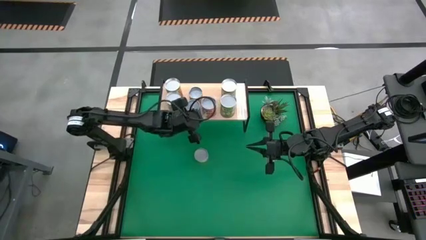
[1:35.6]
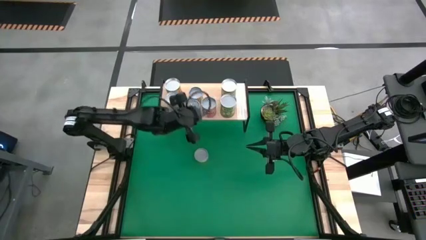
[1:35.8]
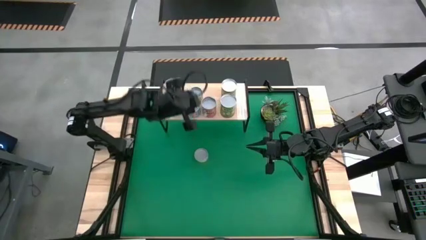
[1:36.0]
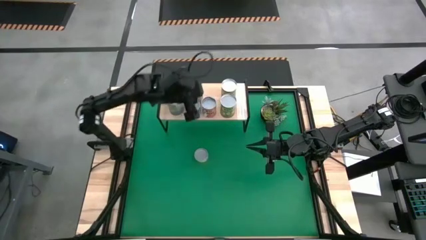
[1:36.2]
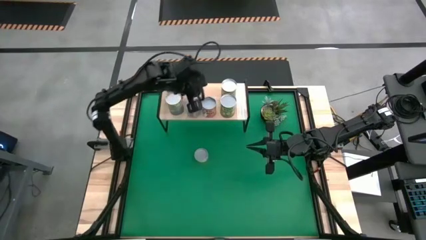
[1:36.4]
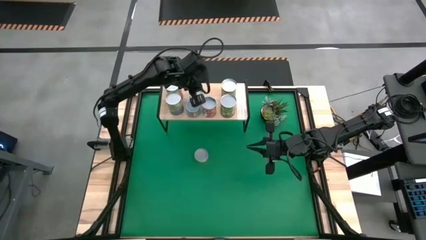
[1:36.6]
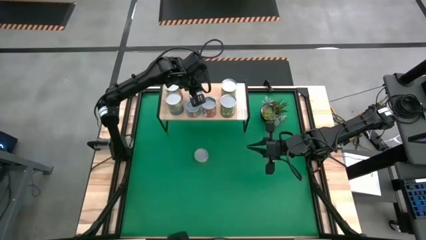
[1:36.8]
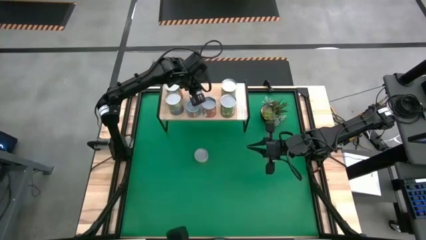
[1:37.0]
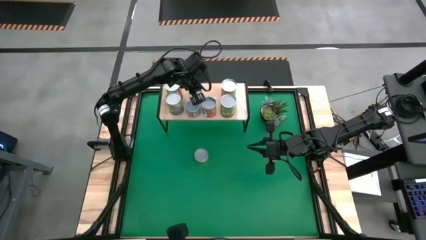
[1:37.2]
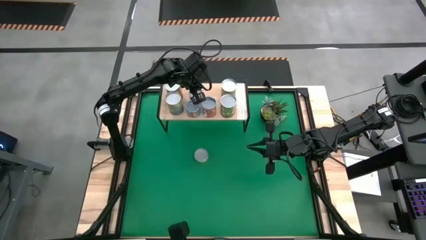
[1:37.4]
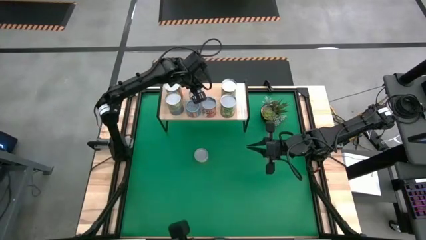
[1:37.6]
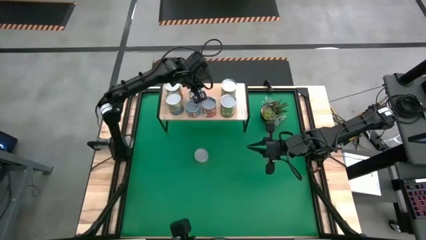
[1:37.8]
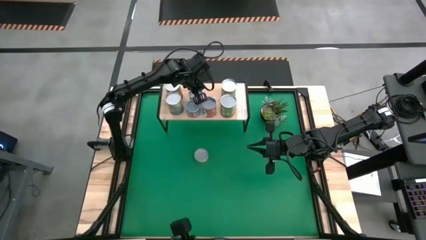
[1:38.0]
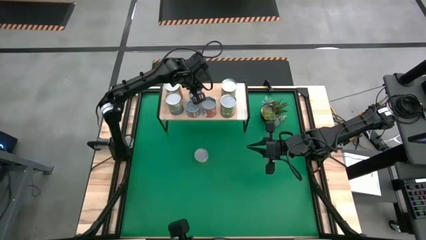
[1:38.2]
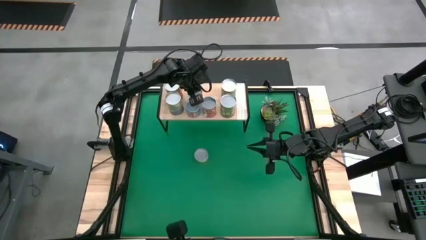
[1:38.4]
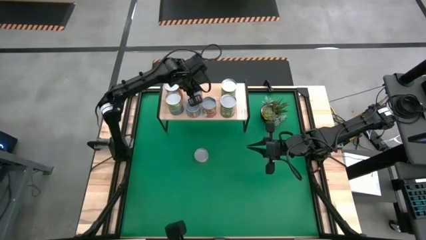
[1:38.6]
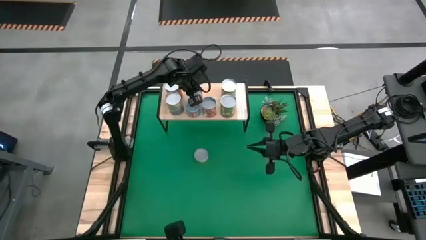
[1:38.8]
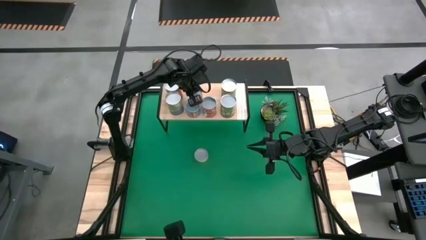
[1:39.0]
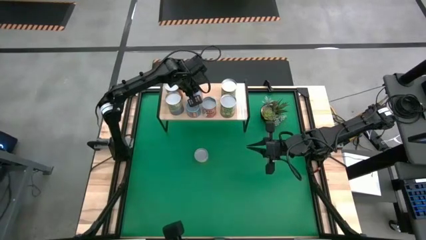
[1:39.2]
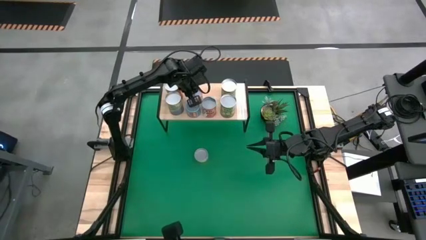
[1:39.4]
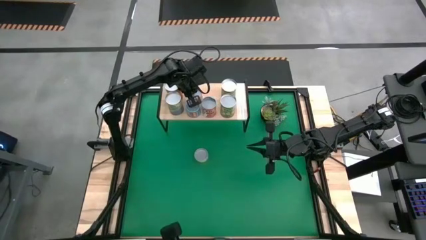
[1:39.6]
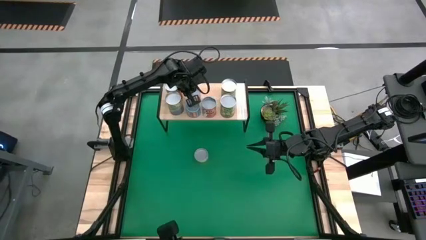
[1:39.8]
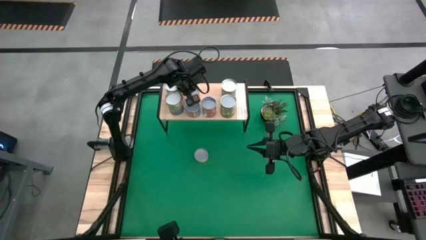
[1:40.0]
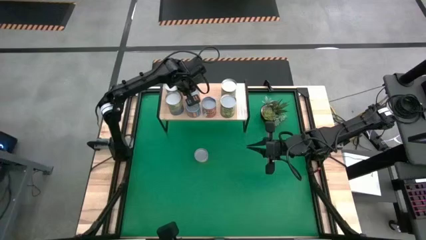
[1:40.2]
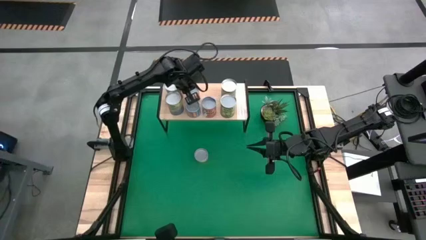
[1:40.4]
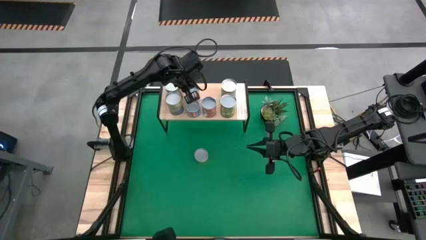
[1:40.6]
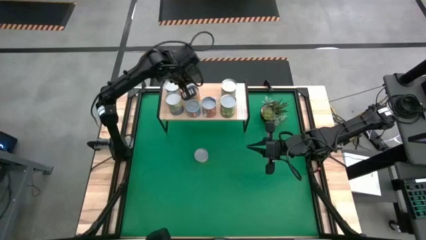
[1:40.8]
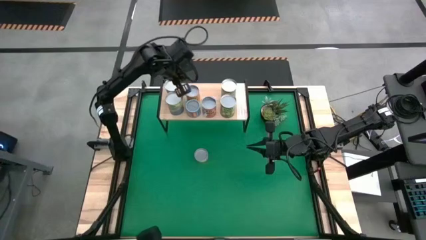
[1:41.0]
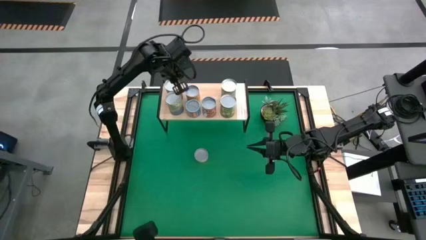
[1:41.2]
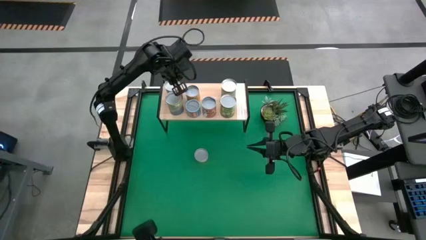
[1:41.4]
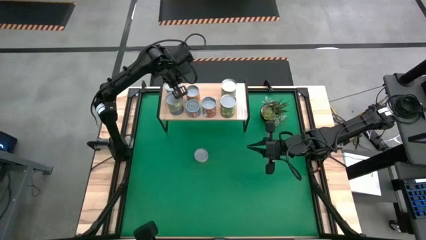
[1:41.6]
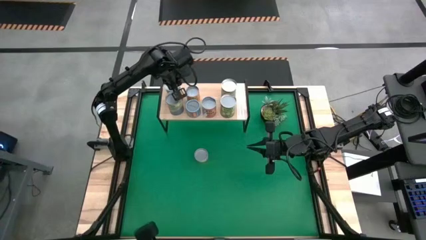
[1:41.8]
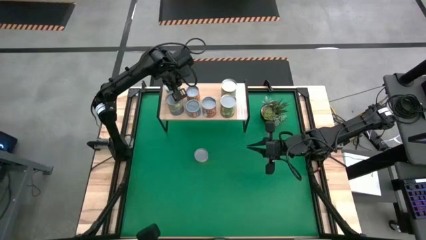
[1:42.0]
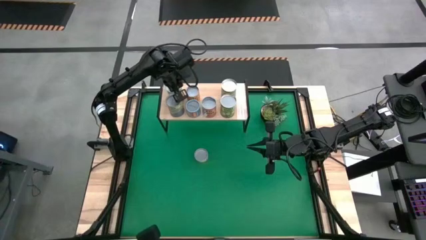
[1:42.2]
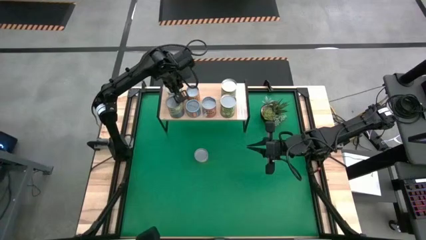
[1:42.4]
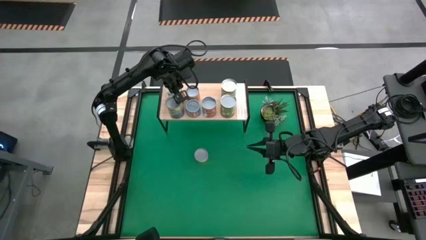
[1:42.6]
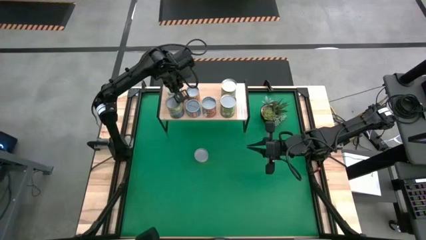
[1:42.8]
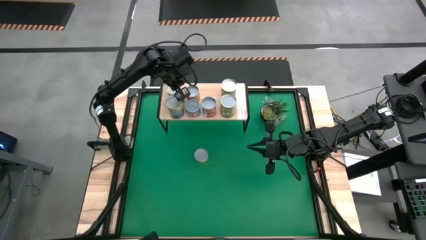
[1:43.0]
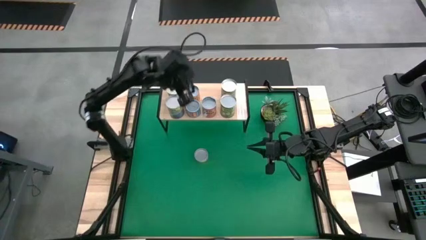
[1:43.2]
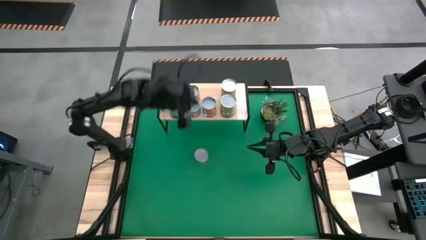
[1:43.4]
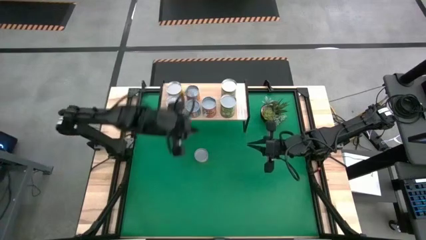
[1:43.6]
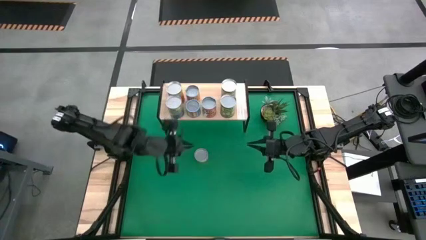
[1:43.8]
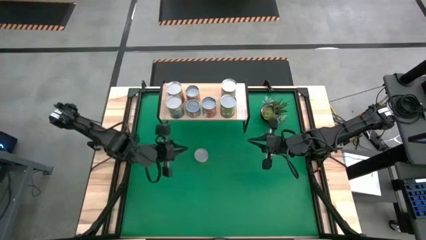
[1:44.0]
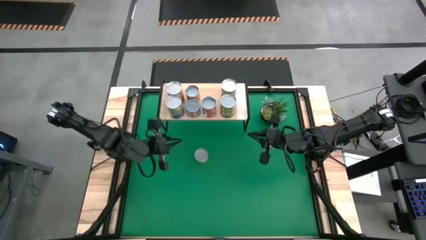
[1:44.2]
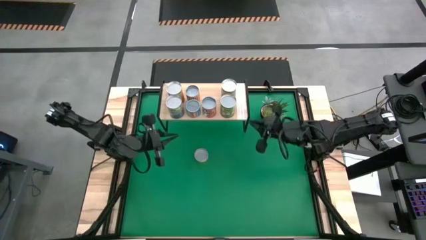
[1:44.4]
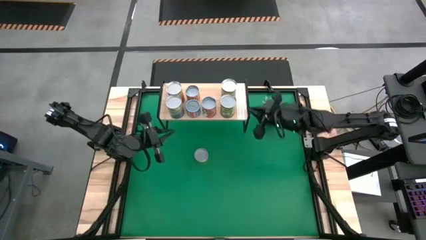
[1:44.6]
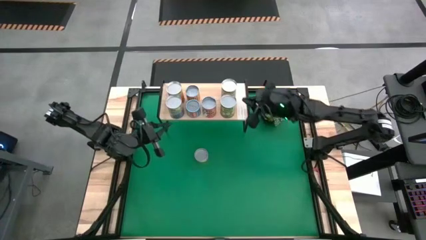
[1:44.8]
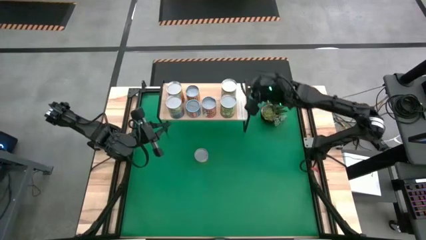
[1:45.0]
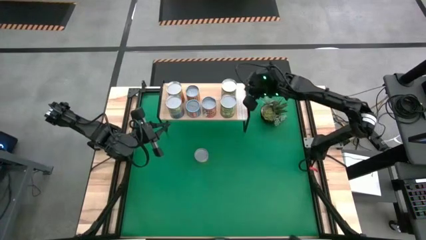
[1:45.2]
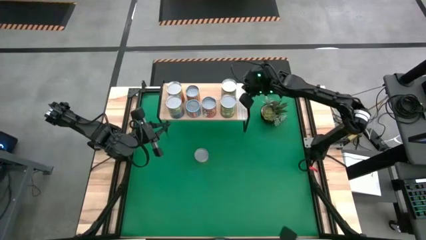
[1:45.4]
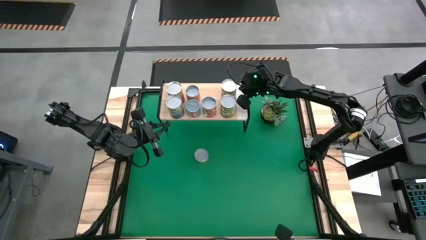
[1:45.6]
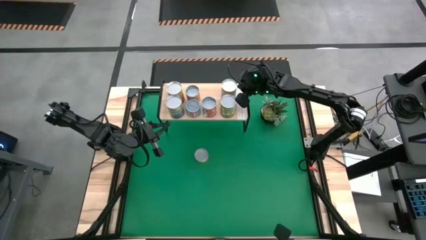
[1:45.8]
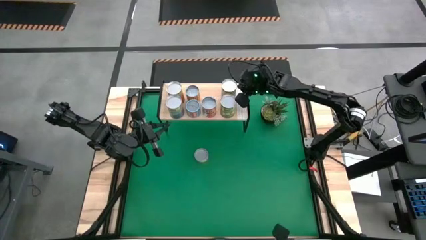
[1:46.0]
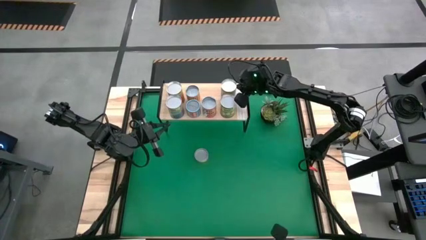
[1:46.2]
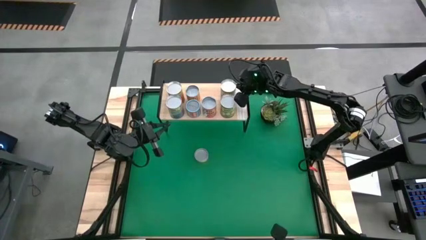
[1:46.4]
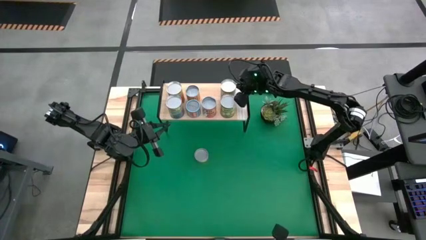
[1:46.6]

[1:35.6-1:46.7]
Task: Pick and place cans onto a shelf
Adjust the cans on the shelf

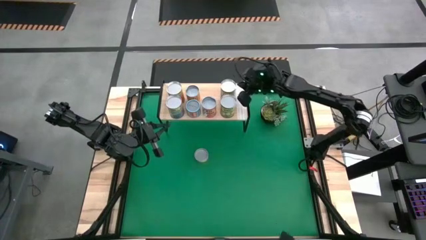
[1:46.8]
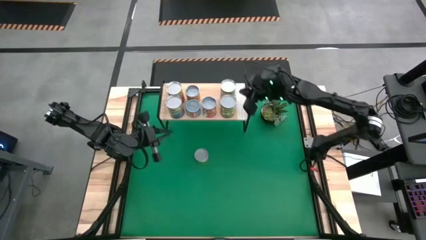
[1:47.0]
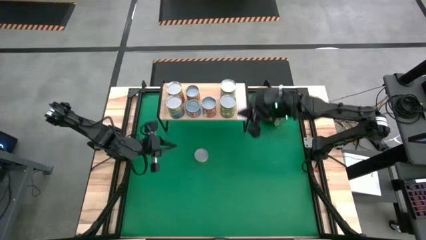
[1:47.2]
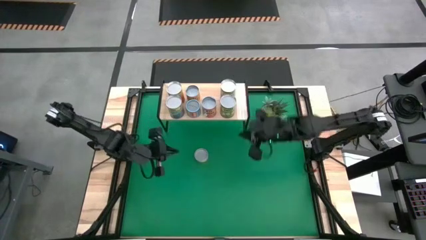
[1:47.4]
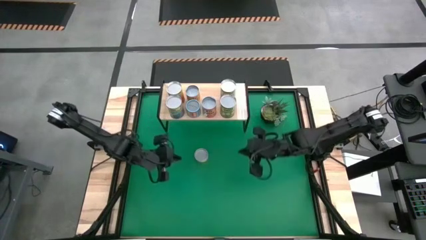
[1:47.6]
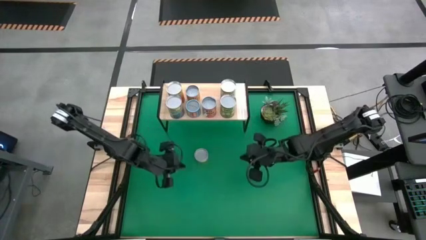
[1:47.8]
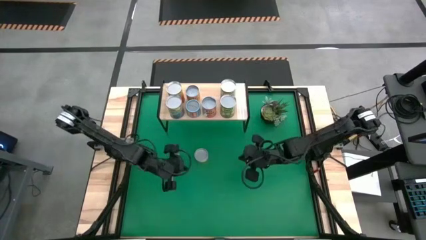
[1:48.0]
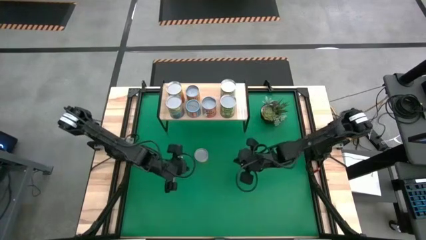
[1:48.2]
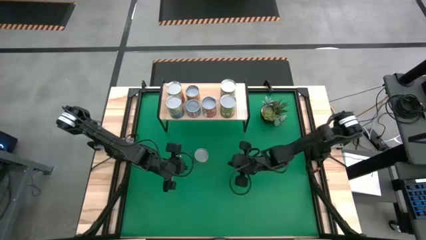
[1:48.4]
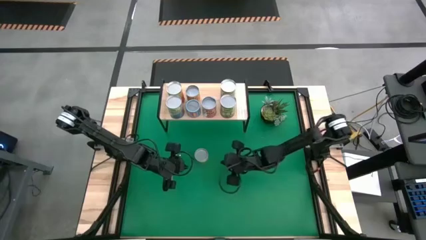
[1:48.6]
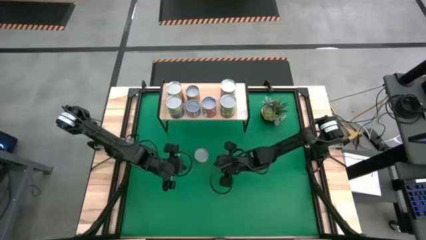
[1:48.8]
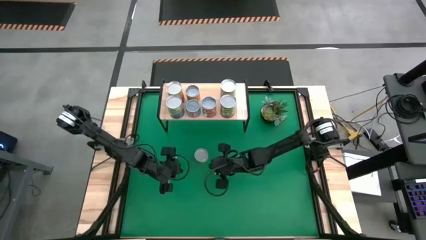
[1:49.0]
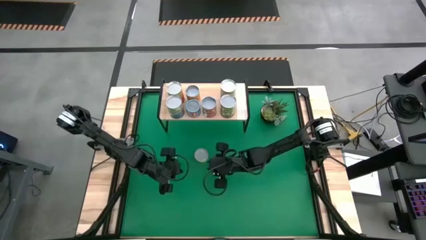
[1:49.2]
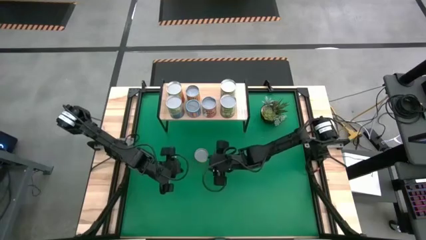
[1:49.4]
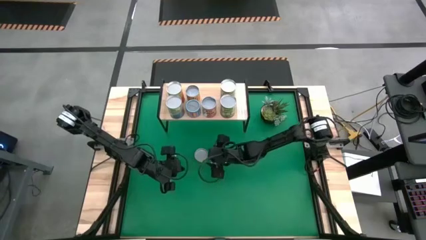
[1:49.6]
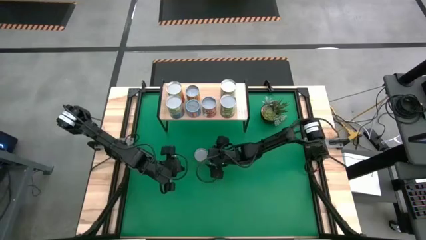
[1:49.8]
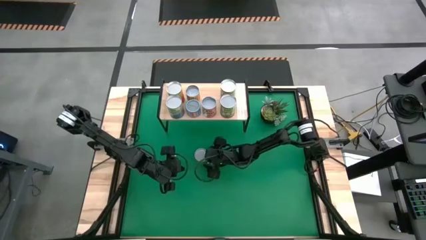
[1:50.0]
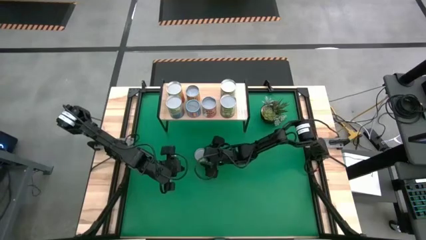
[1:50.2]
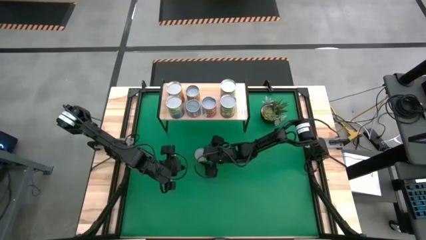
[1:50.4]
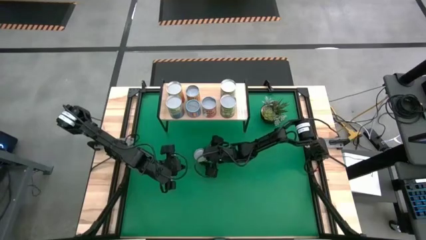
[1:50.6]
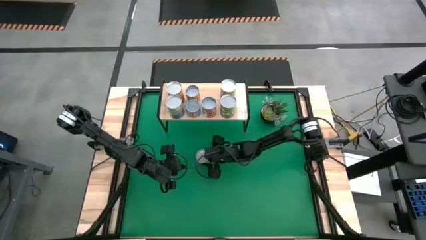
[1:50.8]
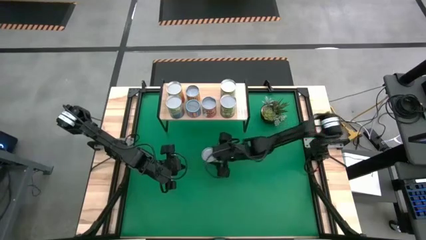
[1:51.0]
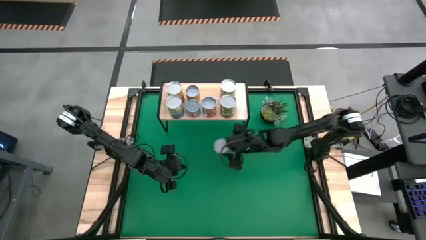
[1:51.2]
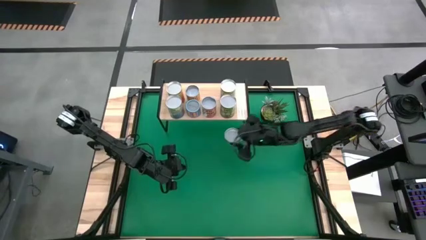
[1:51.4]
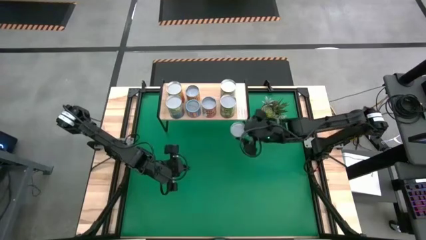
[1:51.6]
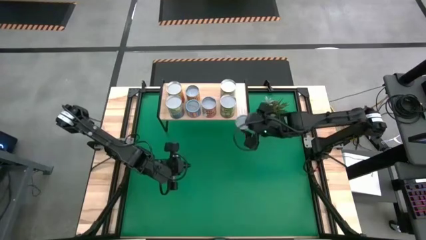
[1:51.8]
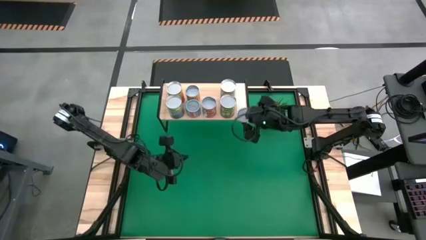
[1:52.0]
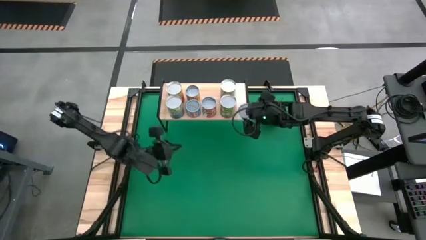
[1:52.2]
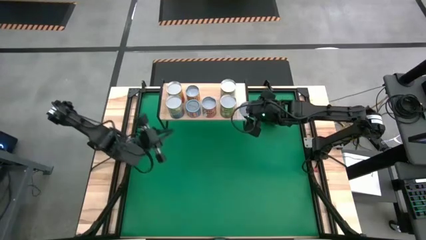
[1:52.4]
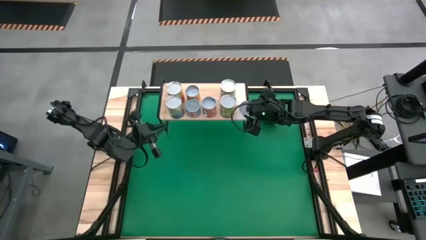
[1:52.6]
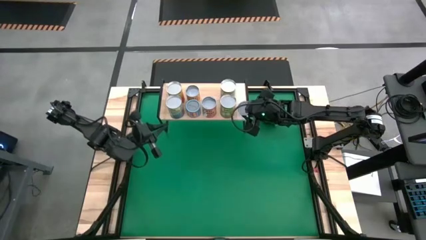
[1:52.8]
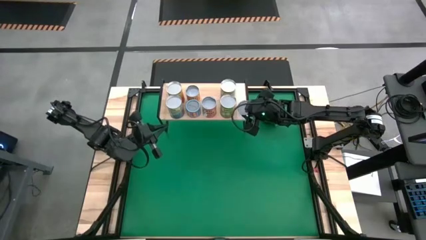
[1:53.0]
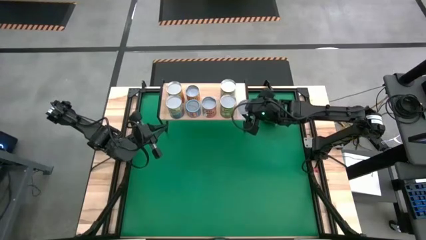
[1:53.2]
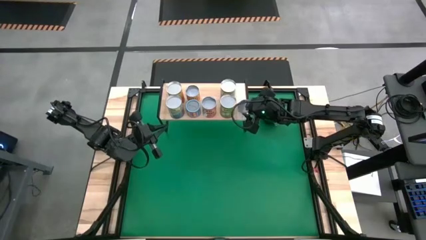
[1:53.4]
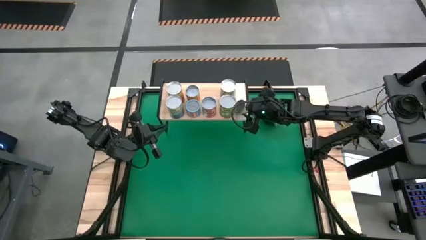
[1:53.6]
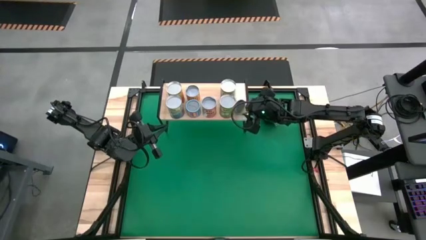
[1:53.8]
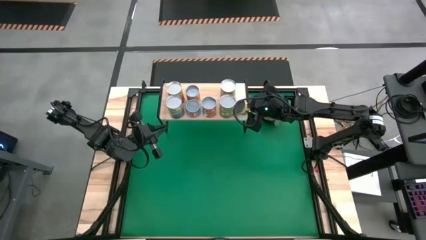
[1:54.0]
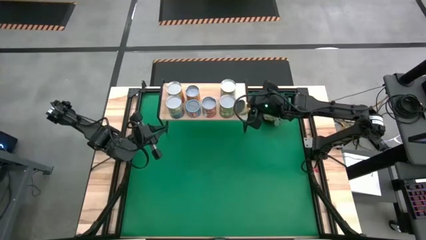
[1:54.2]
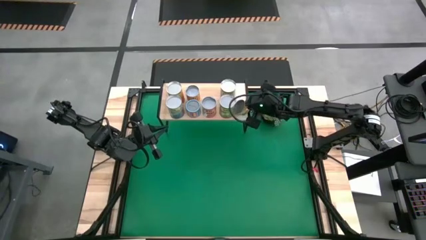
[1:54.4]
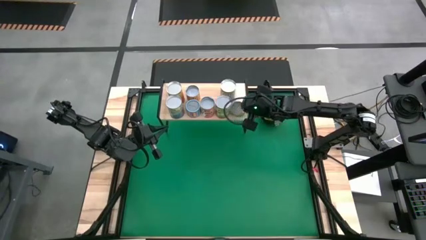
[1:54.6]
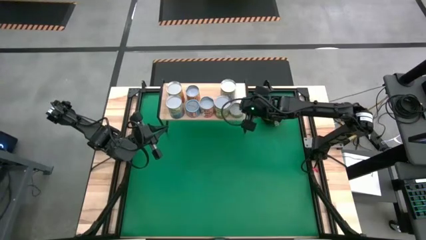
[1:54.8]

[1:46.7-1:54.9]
Put the small green can on the shelf
